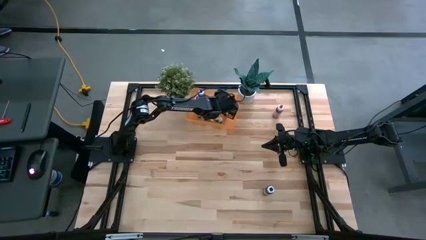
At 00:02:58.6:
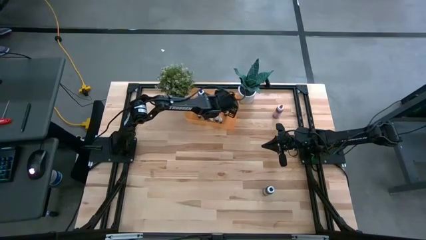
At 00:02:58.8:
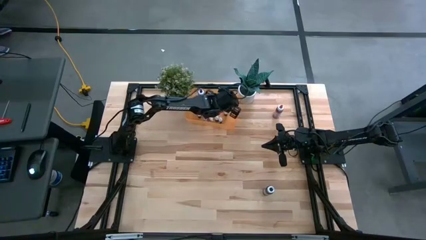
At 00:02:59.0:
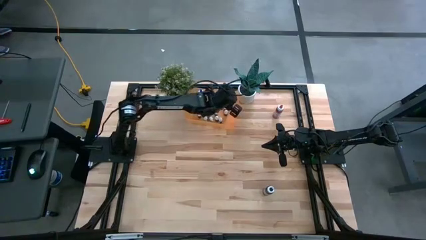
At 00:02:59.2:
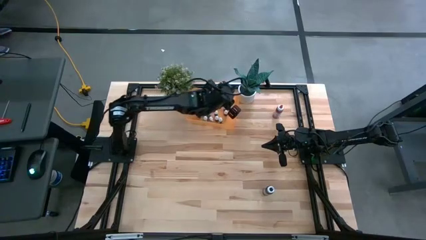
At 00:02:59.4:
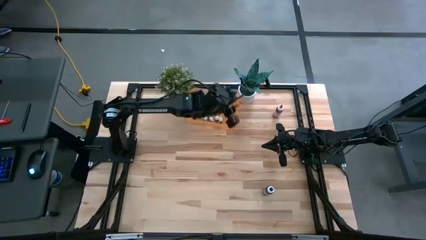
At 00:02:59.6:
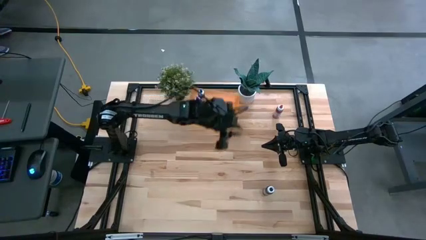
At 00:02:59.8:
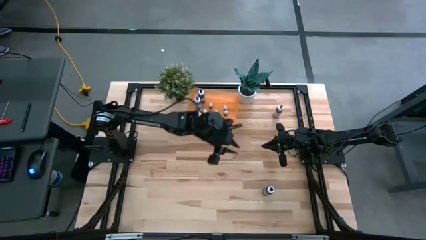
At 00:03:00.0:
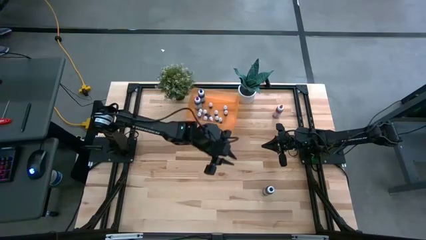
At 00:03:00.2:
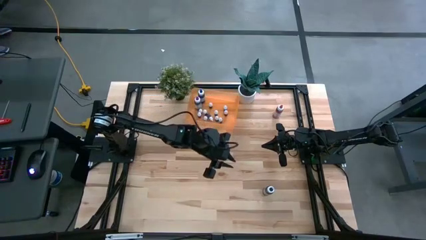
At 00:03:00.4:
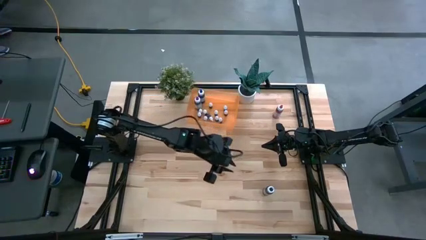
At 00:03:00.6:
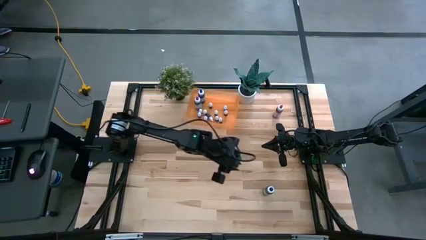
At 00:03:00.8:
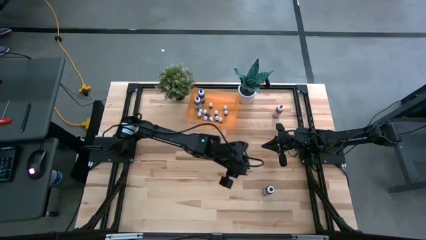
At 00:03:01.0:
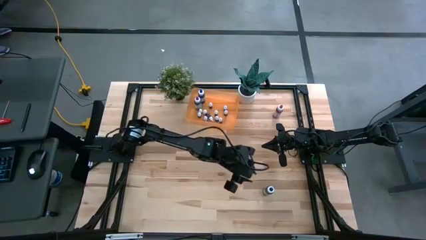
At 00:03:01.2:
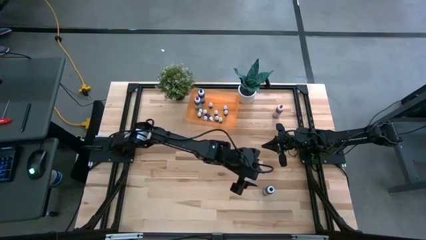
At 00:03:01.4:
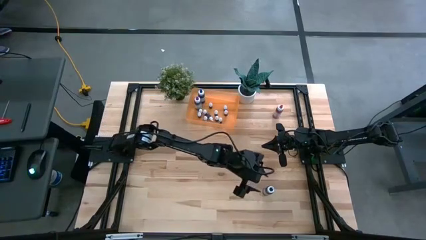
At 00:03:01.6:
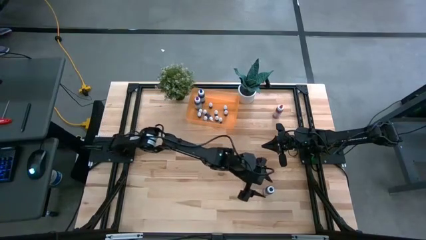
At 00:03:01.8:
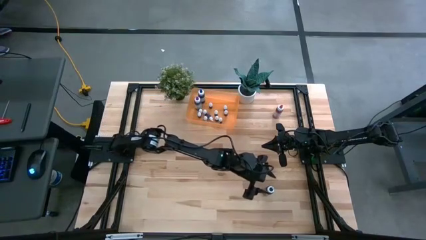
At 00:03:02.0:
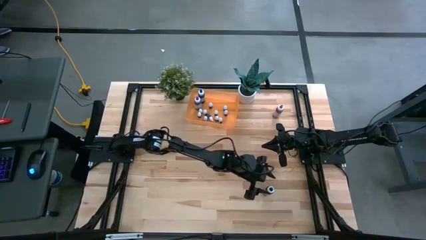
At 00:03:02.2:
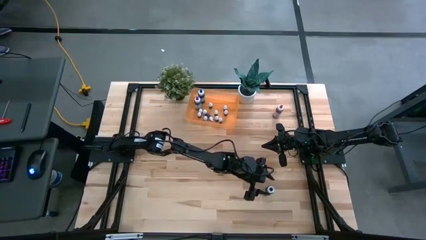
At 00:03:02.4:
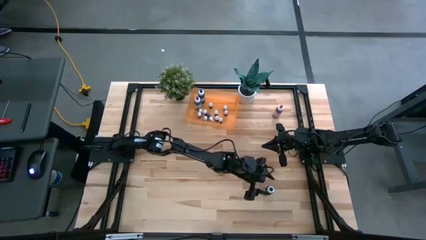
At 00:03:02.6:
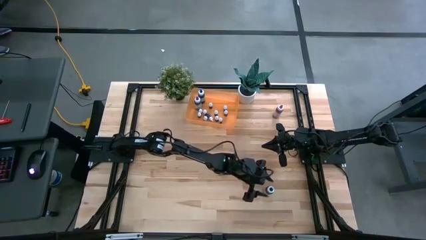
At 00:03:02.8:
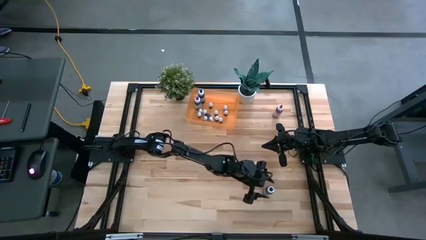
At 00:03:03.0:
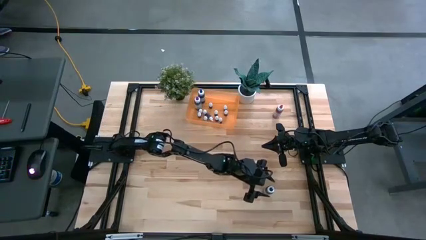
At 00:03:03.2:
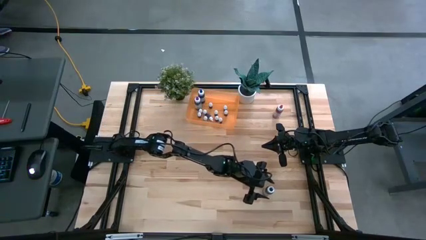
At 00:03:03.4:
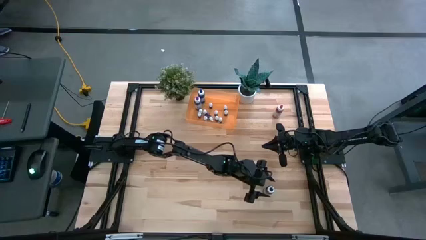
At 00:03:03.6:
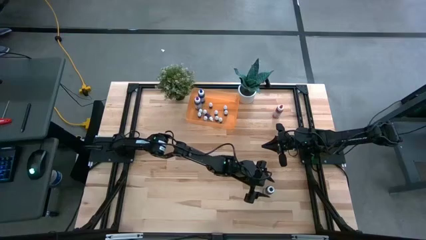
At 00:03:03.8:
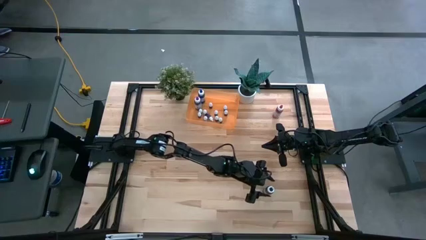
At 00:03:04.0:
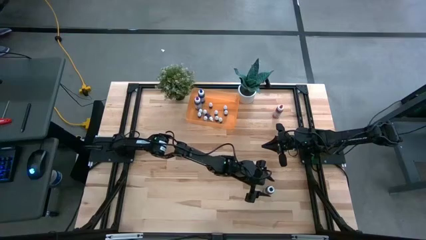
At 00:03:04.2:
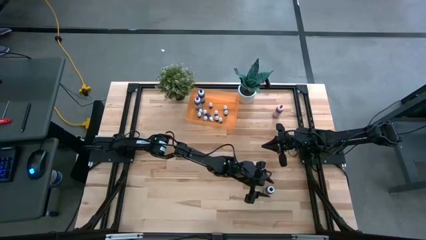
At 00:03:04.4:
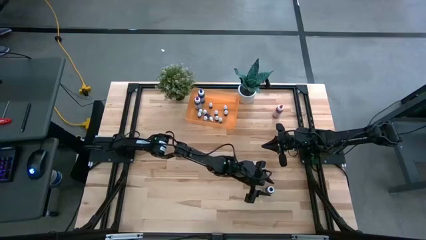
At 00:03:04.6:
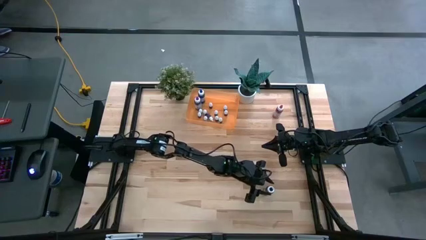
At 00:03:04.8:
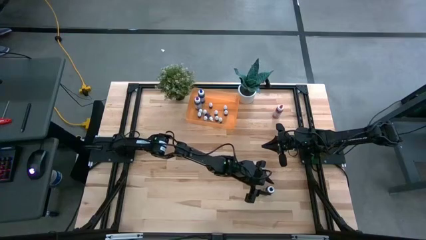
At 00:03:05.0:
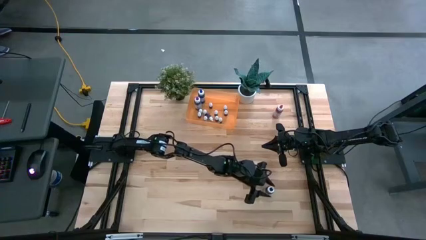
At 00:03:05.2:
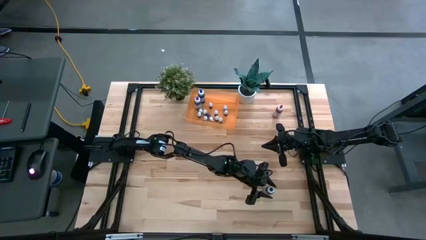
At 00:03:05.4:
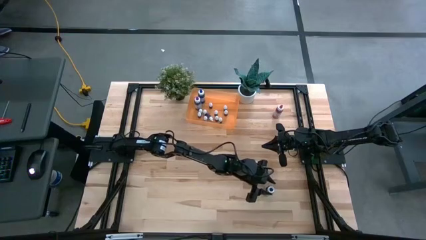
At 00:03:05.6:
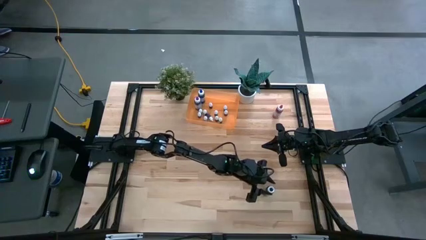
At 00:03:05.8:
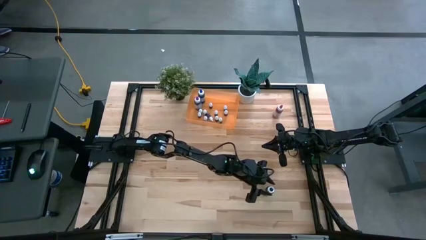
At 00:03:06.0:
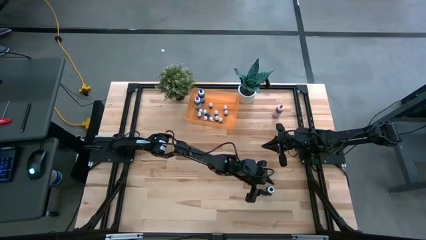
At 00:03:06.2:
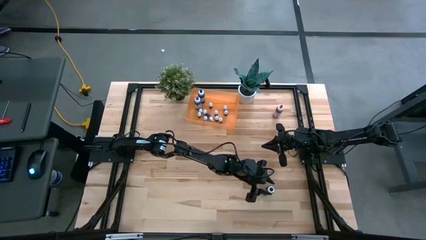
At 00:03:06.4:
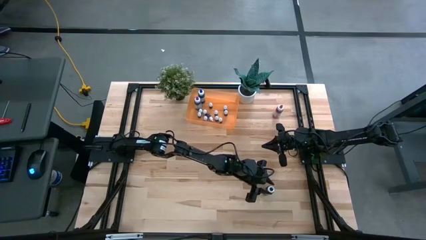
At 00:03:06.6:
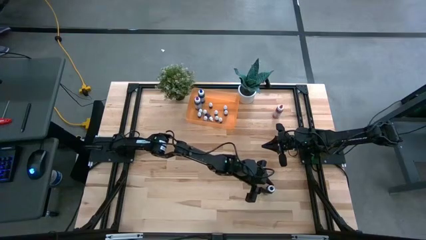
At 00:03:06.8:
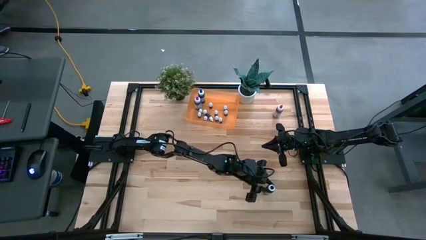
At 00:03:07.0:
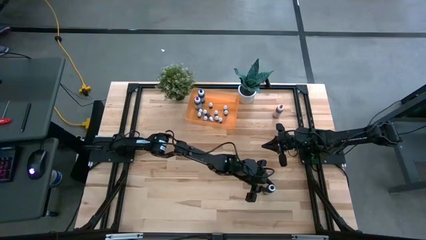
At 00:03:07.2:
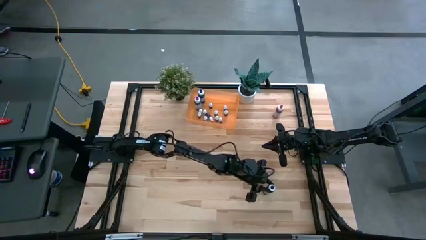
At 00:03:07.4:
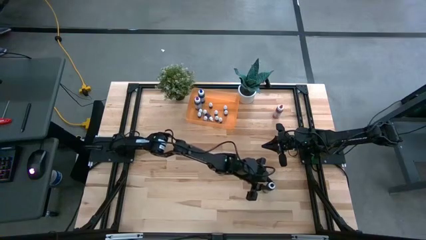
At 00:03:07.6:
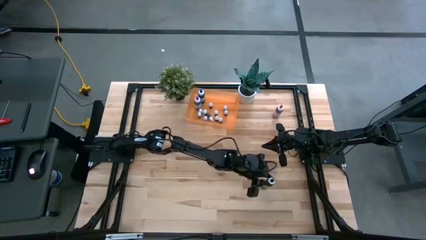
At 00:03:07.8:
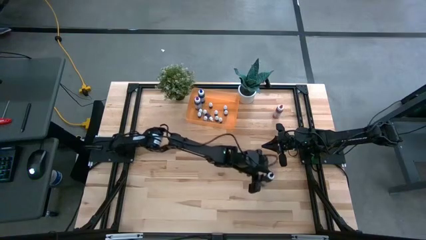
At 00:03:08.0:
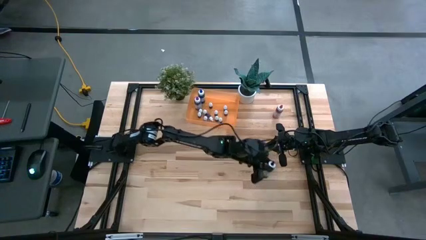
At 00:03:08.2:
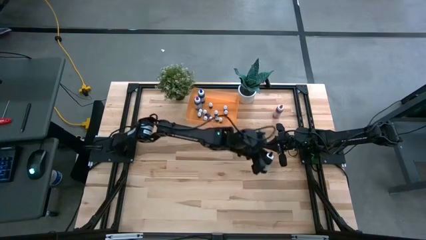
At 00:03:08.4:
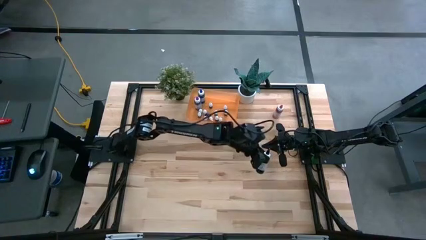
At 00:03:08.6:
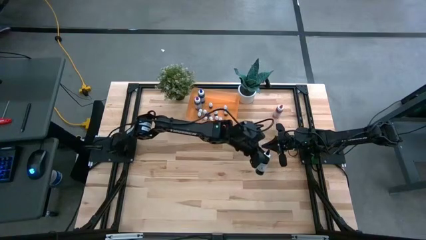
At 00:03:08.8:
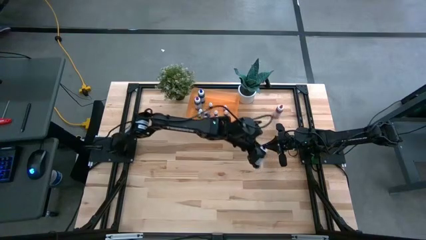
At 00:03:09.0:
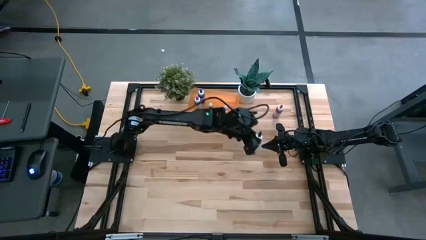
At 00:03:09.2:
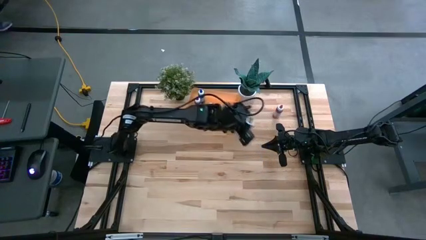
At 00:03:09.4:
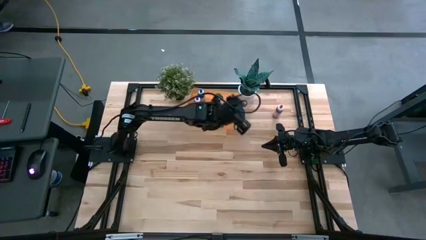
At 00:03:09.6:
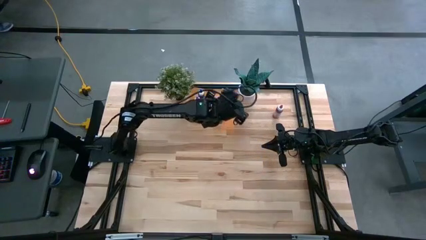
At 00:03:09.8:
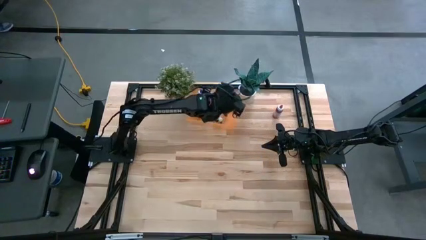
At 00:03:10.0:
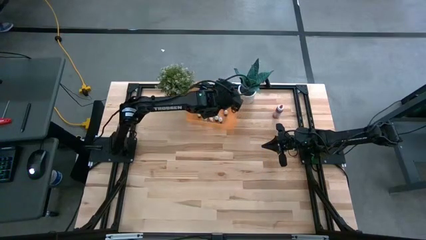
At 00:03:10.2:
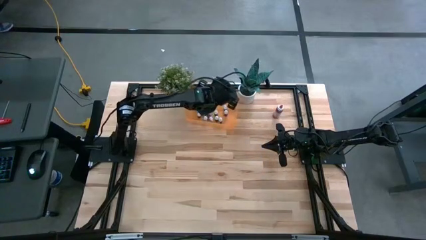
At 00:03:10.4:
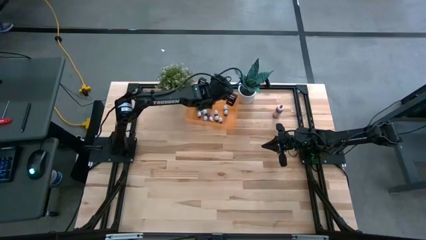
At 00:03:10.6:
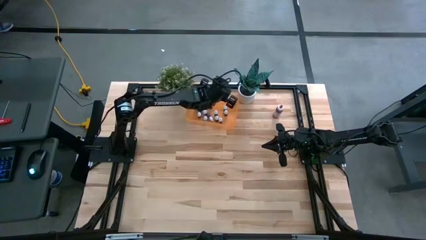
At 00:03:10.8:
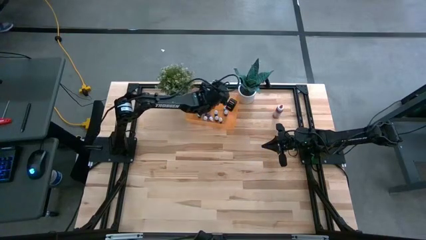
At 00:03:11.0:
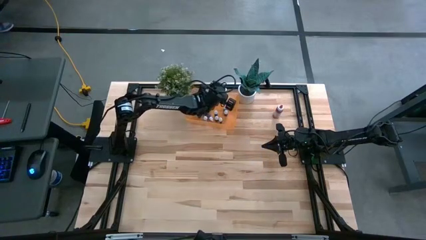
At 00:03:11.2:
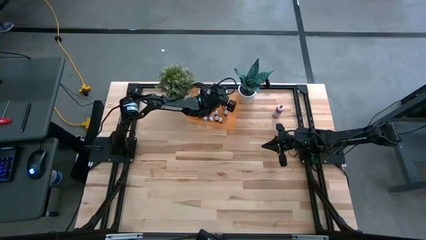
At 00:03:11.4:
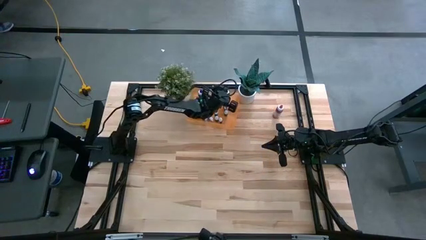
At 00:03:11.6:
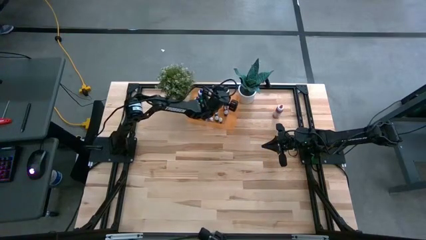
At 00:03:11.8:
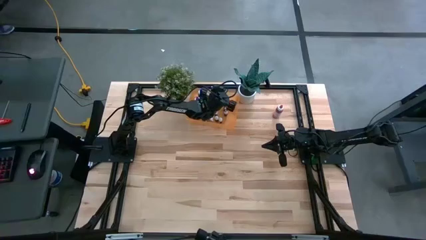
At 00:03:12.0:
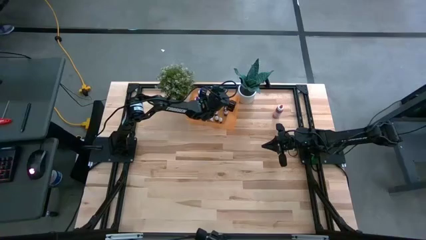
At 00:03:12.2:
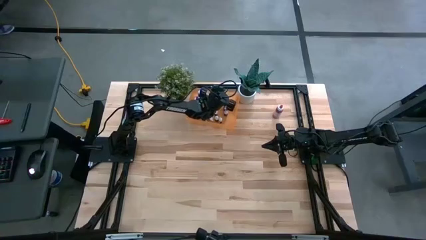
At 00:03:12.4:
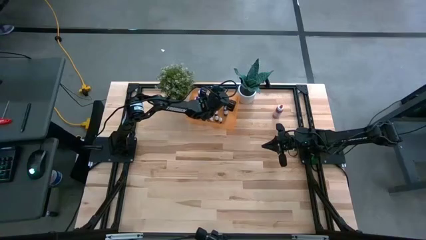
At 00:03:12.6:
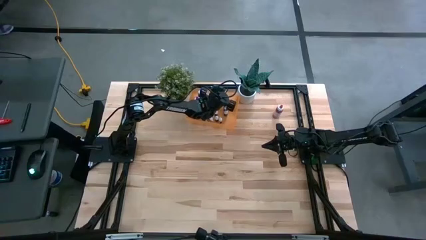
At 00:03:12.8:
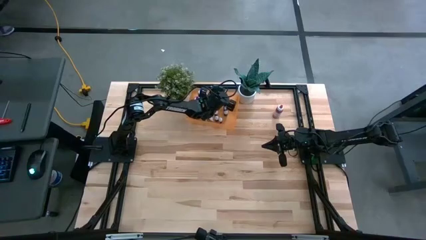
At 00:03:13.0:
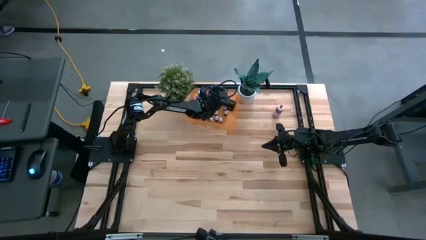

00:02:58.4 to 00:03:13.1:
Task: Pick & Place food coloring
Put the large black bottle into the bin
